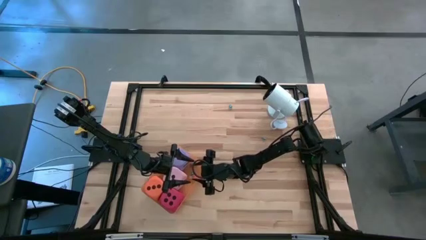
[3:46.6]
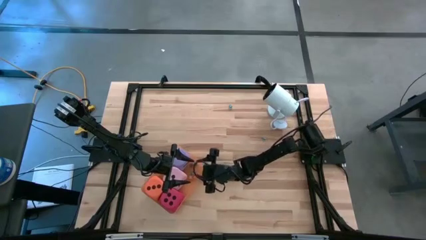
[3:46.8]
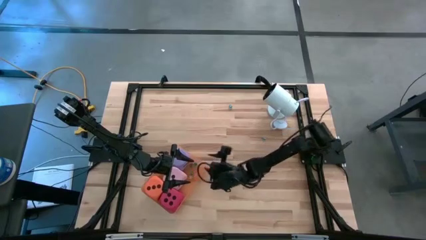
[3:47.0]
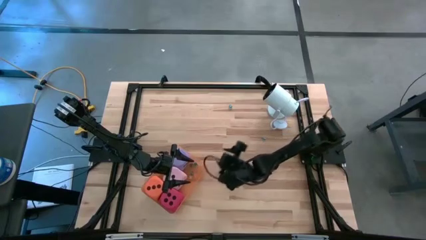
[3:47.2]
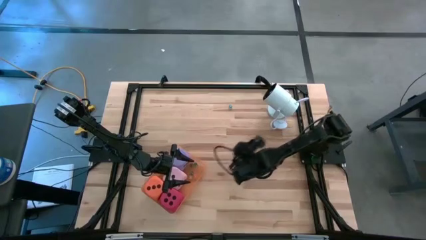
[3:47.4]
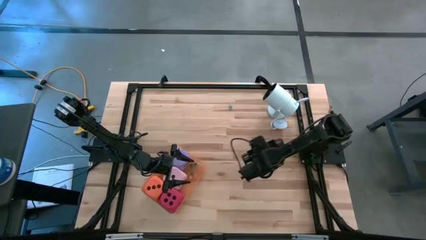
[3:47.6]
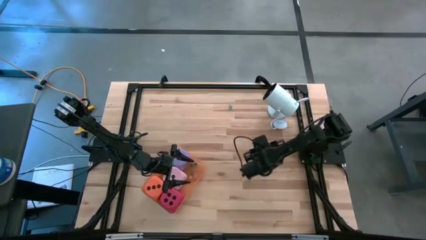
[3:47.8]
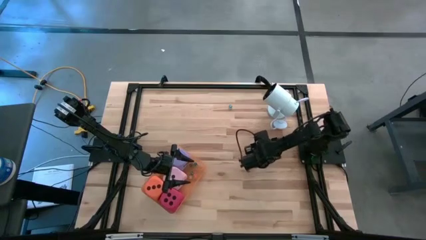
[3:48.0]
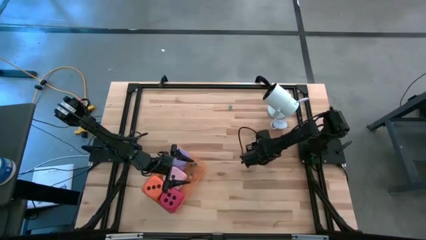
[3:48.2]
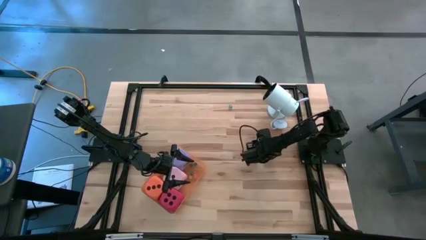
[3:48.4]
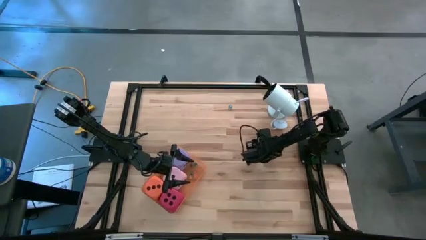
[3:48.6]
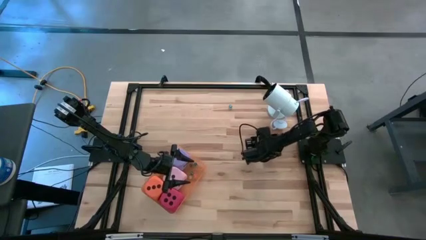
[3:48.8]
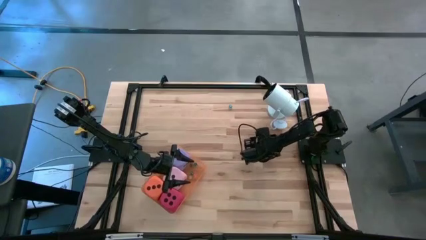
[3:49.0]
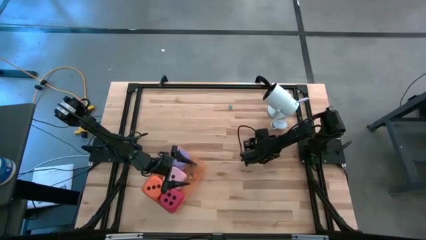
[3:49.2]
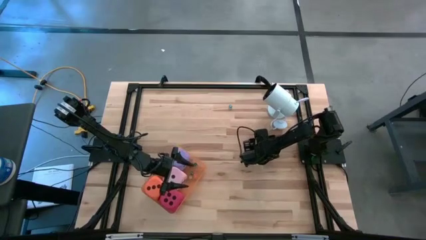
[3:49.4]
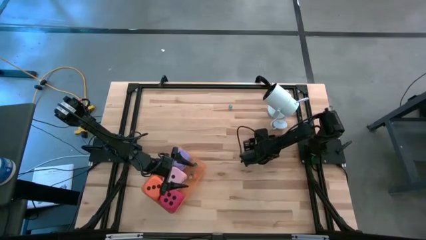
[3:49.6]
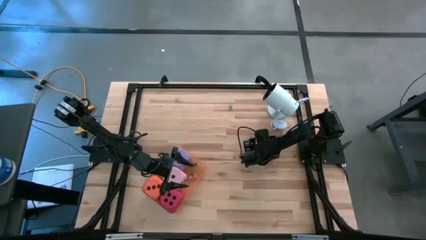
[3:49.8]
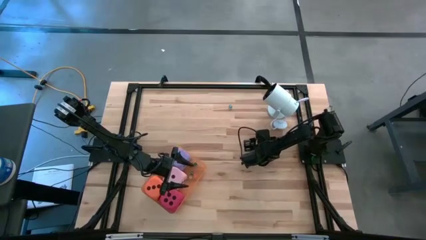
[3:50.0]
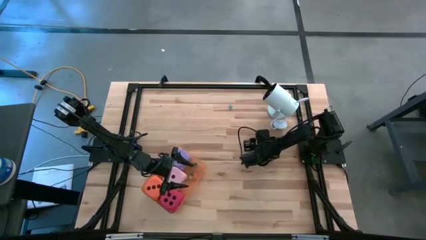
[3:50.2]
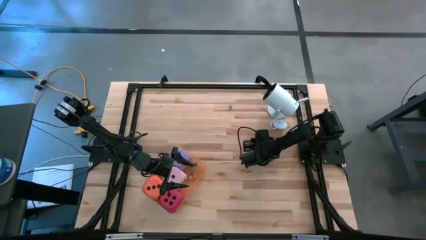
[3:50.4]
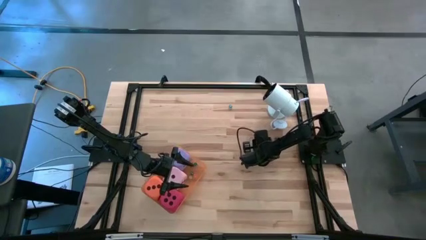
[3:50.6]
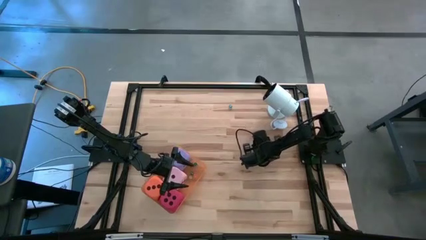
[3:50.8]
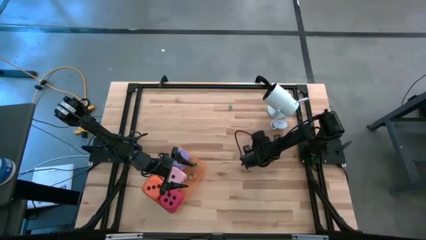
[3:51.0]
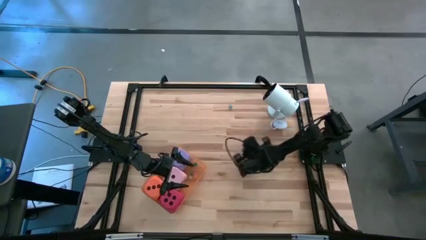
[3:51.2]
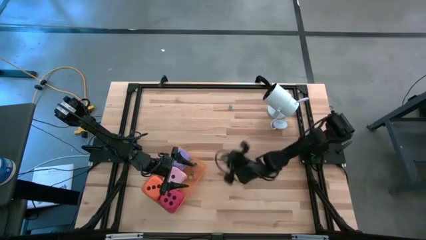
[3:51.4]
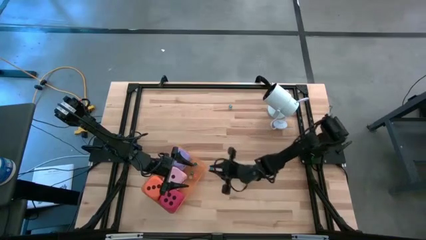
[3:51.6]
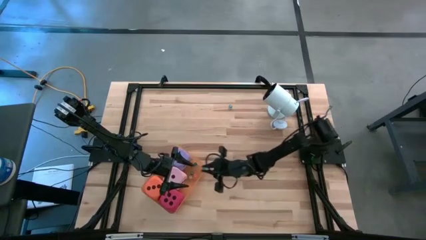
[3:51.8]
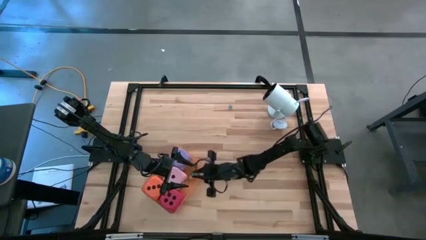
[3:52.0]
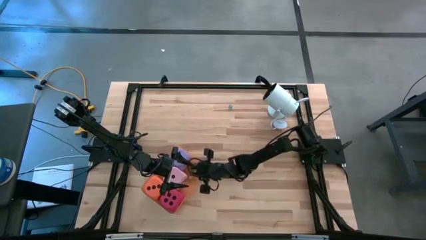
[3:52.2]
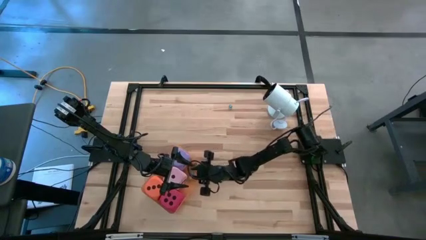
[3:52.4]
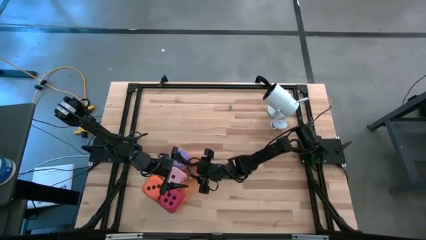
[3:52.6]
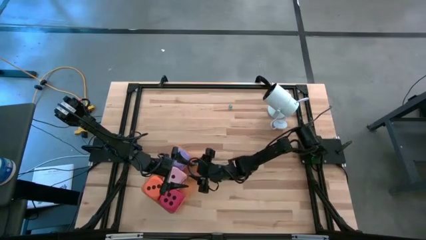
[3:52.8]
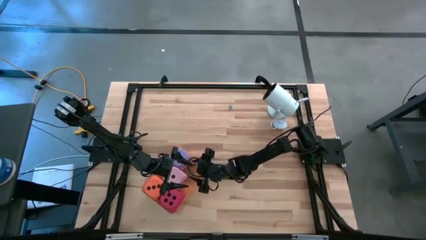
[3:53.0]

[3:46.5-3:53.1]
Task: Pick & Place Dice
Put the small blue dice into the orange bin

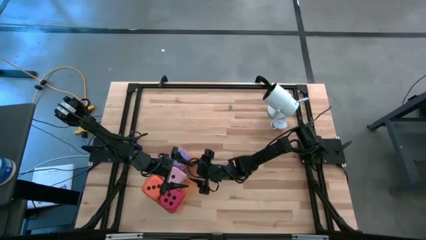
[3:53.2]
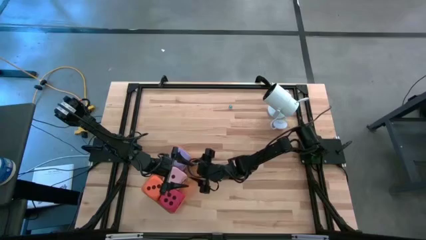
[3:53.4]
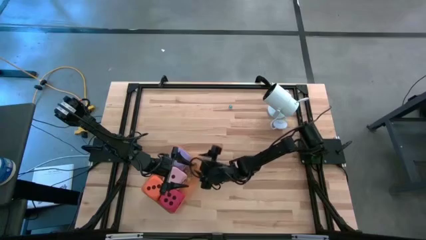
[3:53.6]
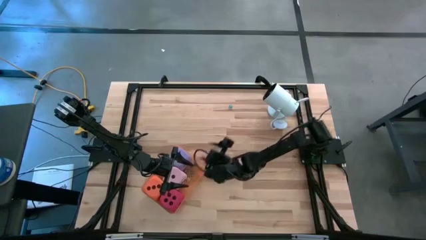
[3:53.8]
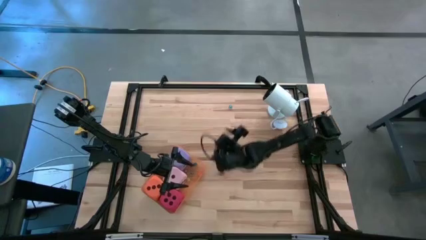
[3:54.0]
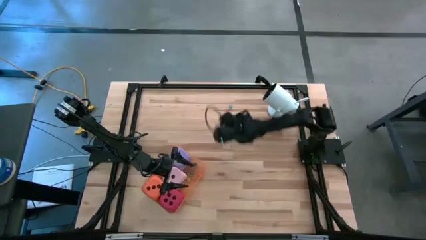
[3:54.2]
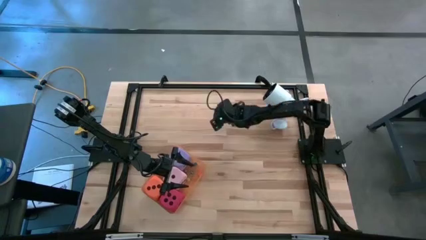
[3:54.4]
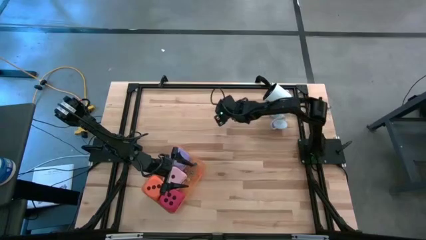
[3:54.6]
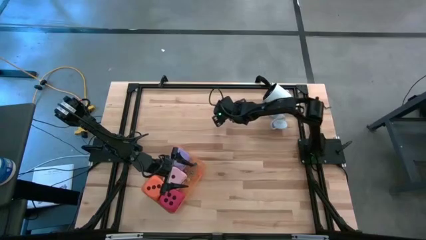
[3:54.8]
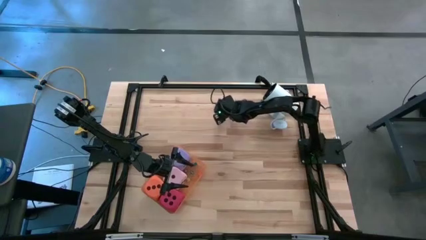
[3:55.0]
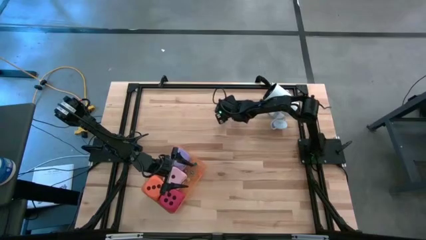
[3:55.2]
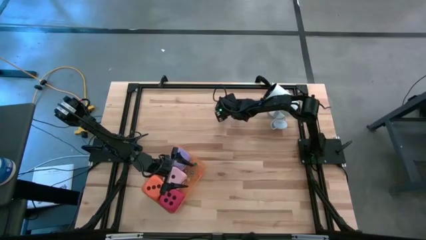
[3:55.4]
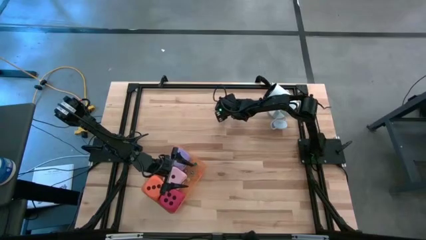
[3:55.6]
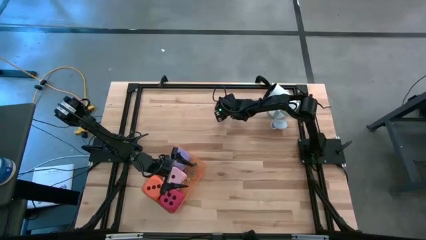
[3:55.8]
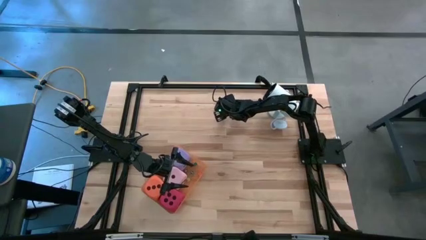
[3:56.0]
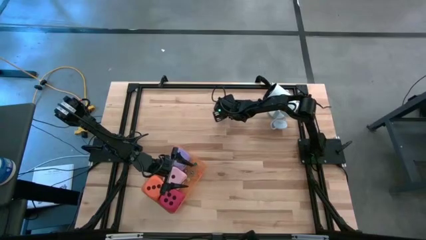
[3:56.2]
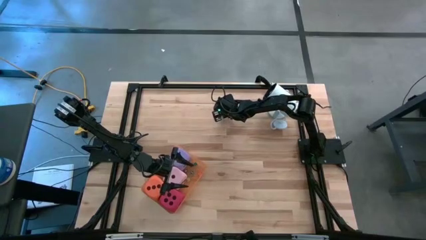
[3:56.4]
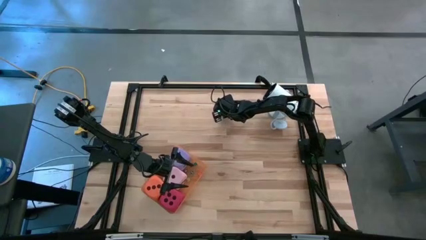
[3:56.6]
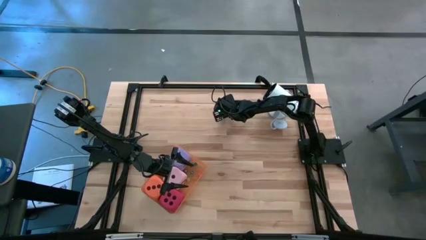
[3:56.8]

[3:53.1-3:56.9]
Put the small blue dice into the orange bin

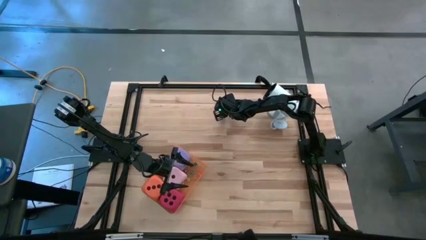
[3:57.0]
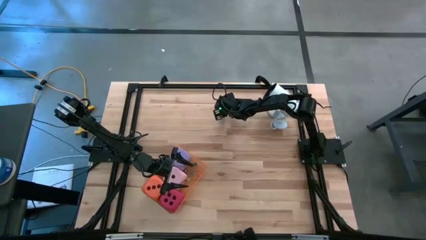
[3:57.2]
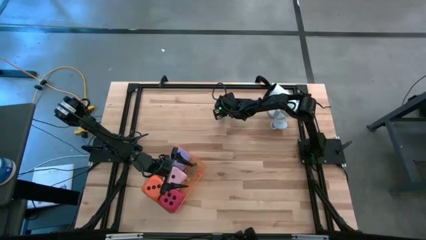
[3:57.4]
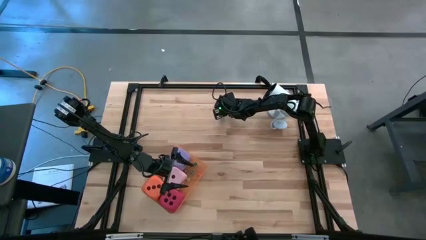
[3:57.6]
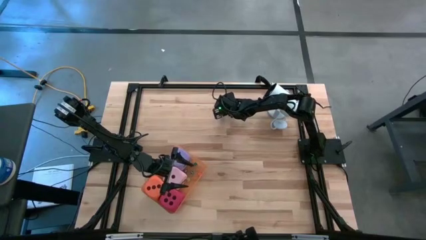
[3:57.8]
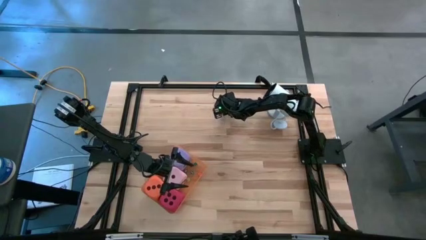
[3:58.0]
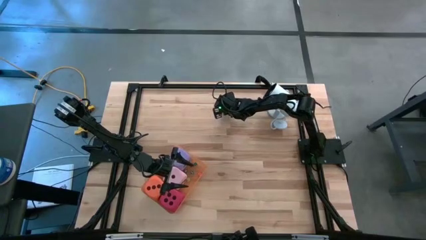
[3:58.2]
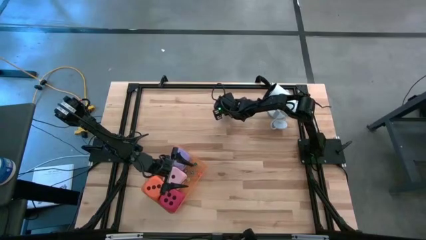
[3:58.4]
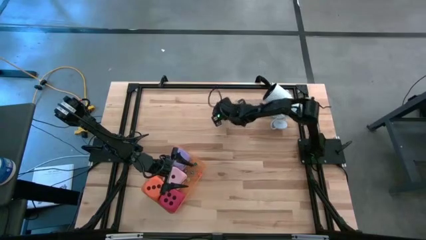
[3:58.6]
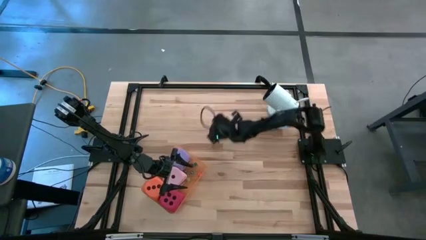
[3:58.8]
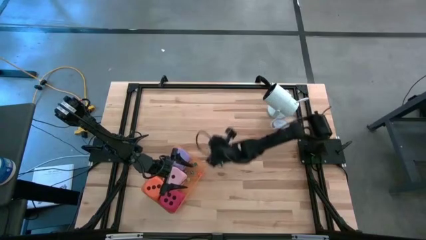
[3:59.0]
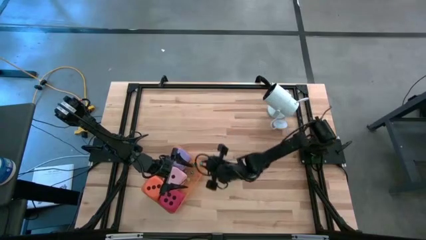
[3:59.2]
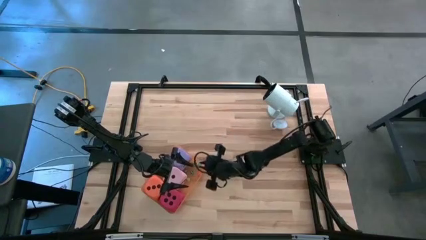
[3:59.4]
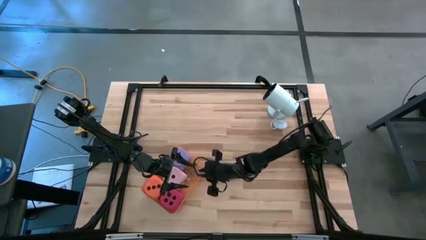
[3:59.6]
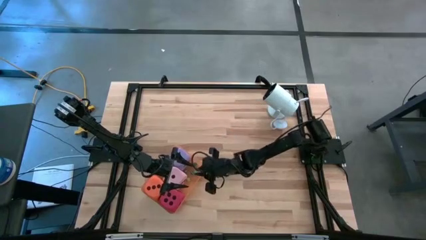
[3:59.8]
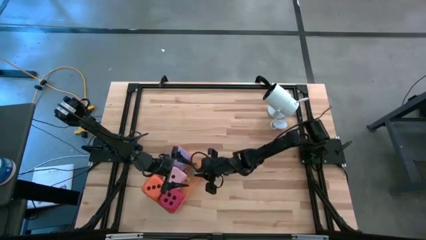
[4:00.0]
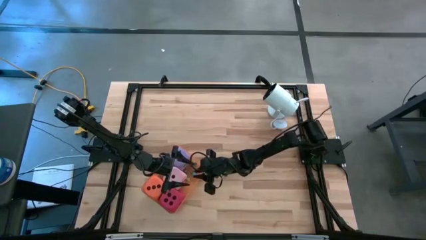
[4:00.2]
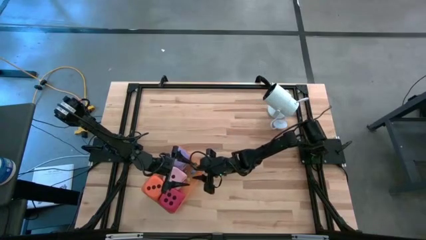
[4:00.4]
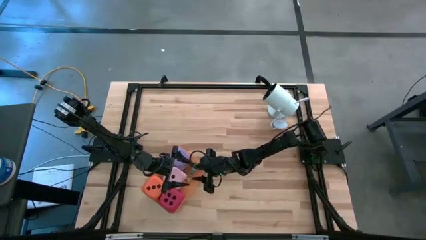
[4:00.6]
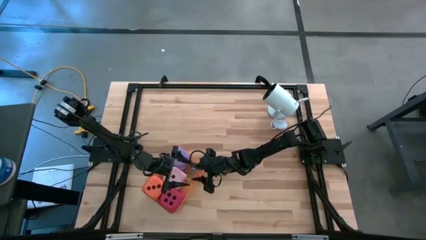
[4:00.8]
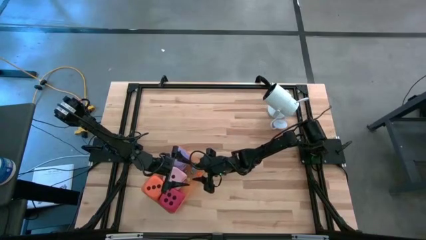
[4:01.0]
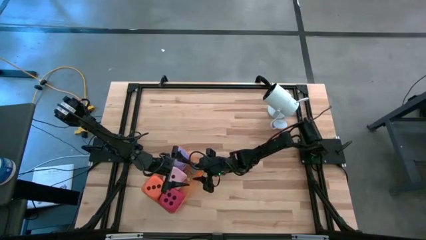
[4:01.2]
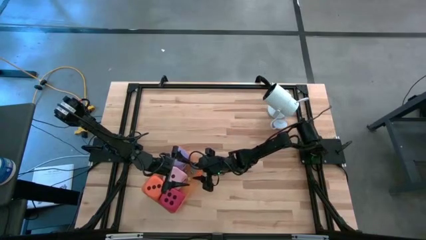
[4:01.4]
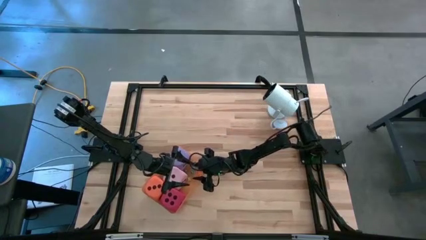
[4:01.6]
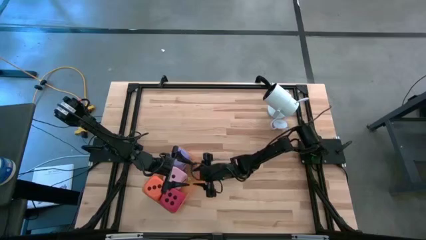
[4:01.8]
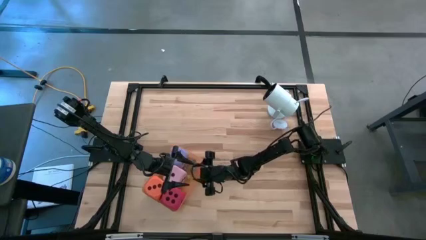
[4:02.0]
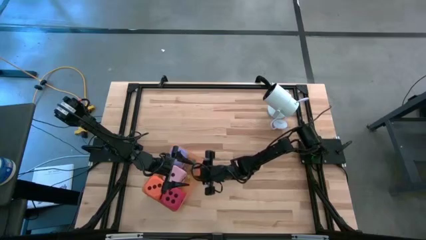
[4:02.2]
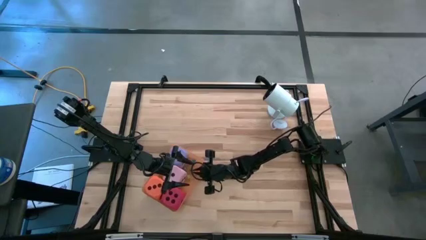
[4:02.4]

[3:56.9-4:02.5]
Put the small blue dice into the orange bin

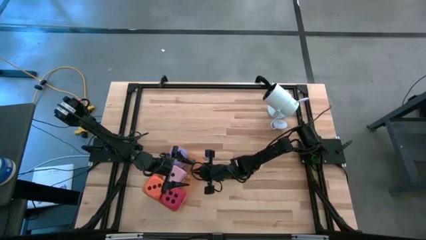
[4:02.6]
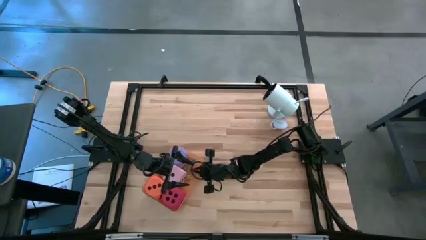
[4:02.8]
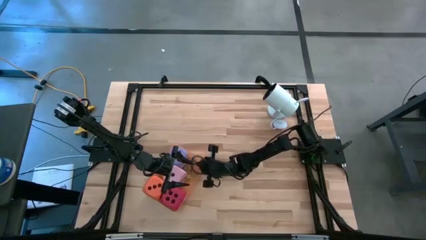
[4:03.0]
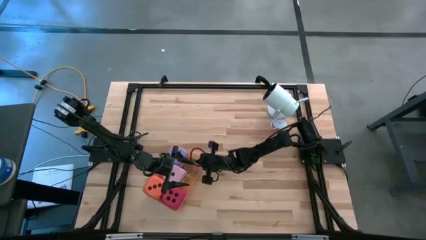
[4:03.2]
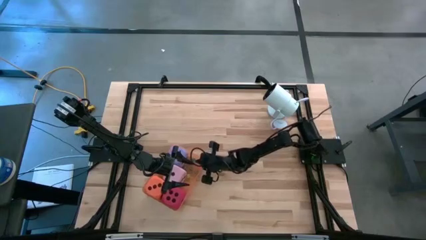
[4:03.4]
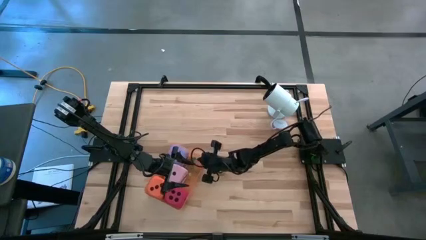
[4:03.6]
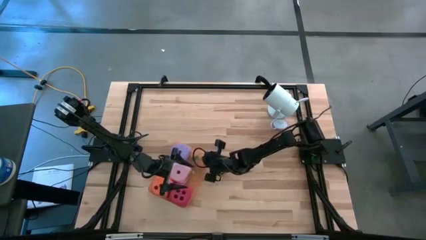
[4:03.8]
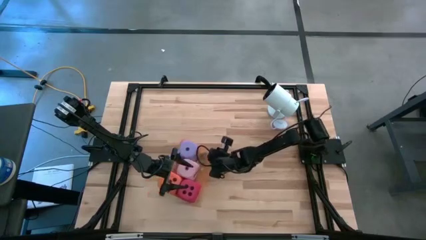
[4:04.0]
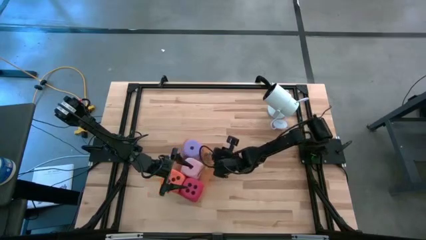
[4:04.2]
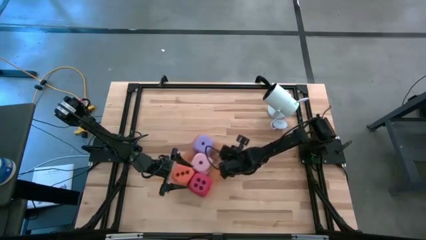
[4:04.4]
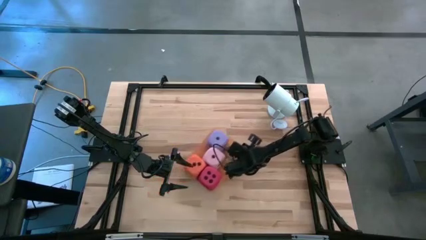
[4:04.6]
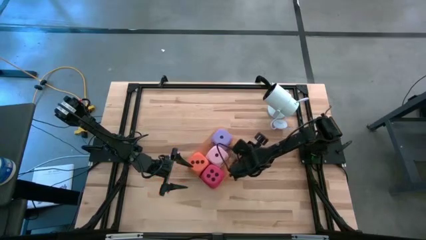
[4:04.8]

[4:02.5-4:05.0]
Move the orange bin to the center of the table
